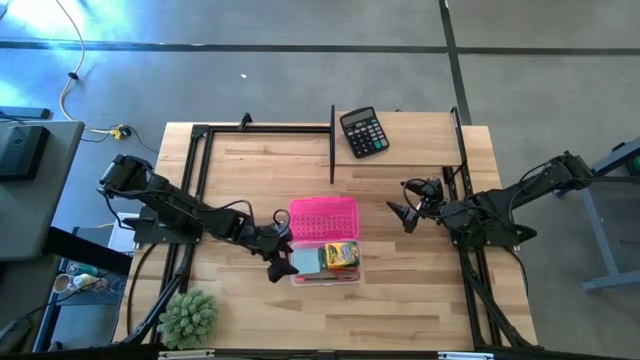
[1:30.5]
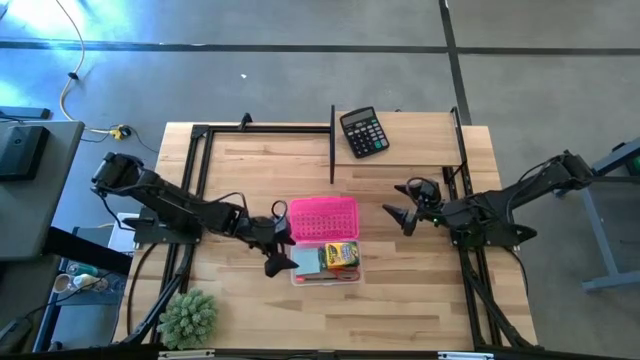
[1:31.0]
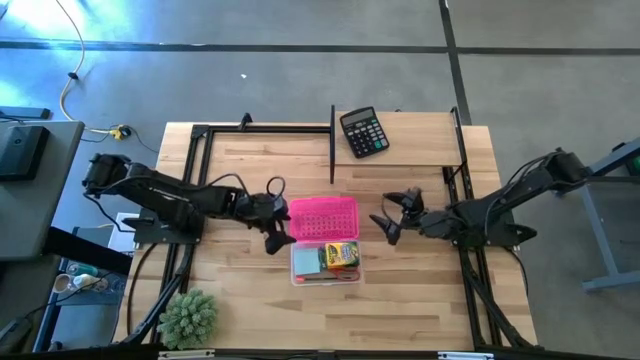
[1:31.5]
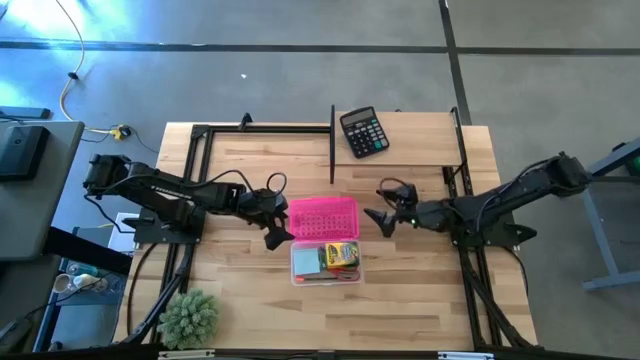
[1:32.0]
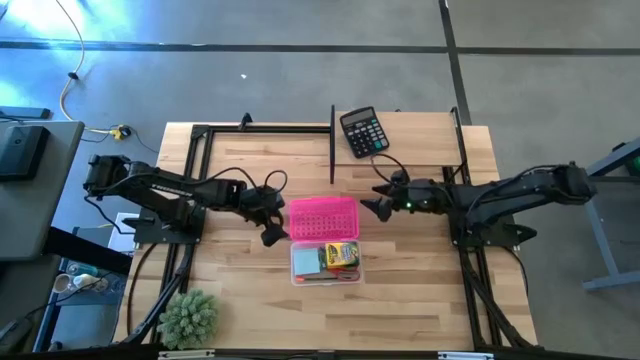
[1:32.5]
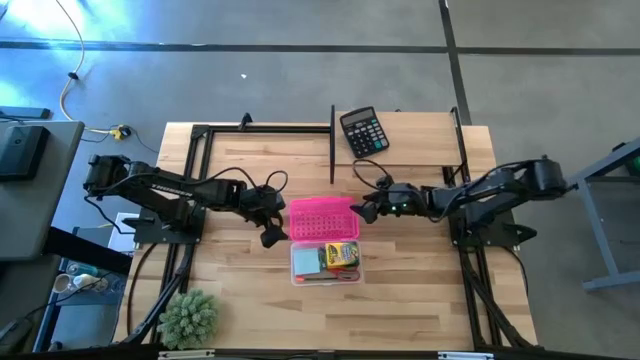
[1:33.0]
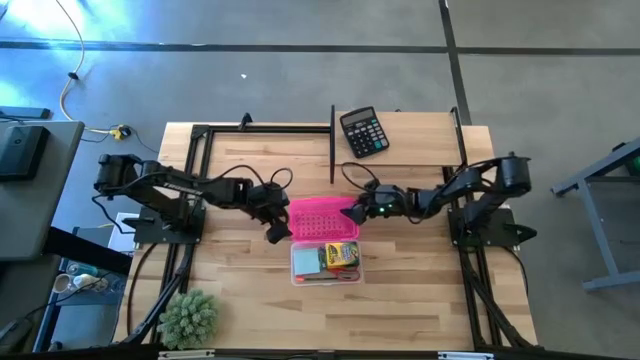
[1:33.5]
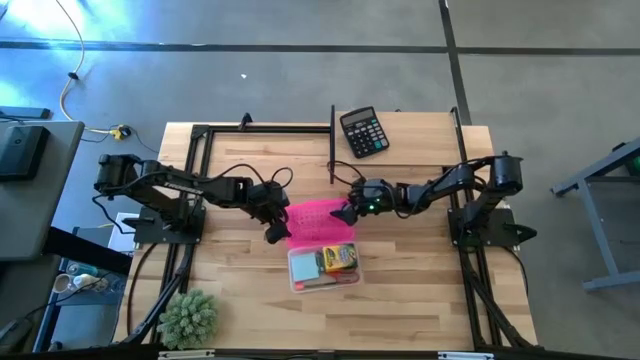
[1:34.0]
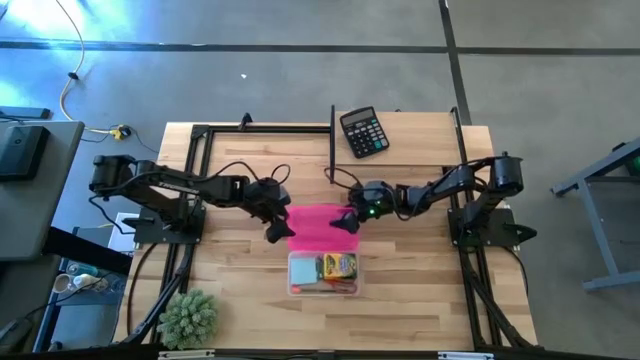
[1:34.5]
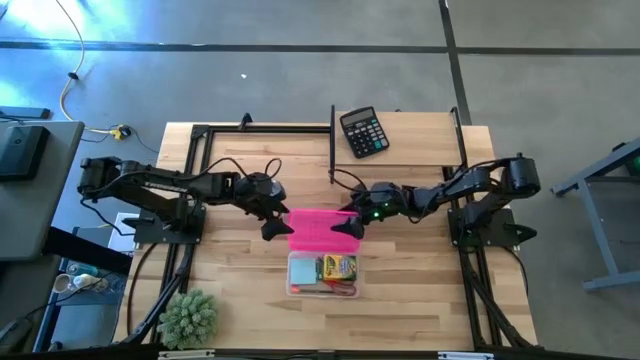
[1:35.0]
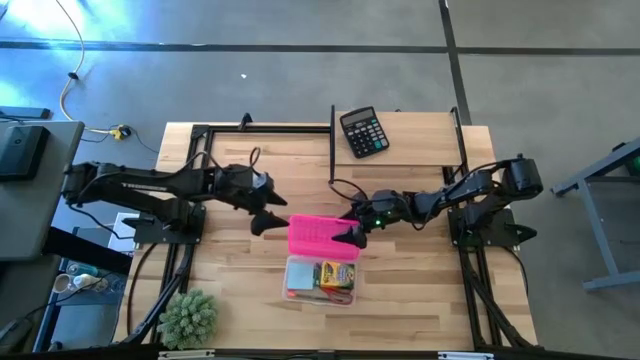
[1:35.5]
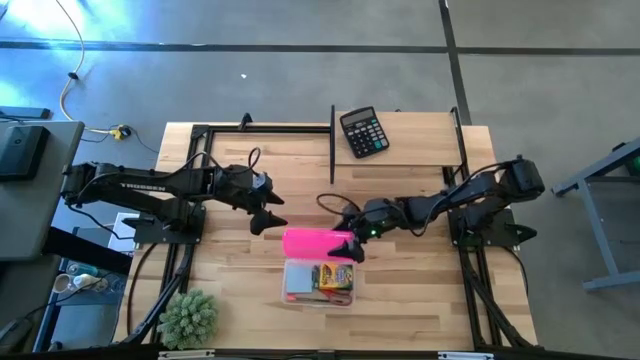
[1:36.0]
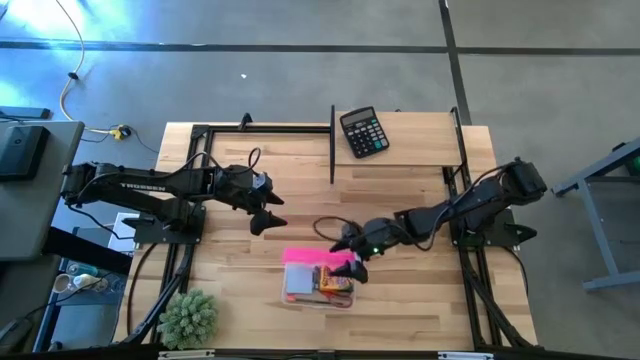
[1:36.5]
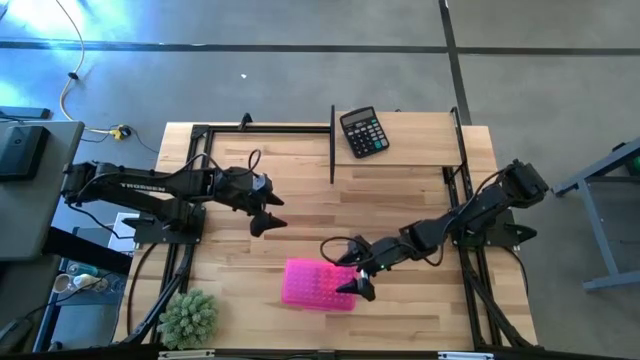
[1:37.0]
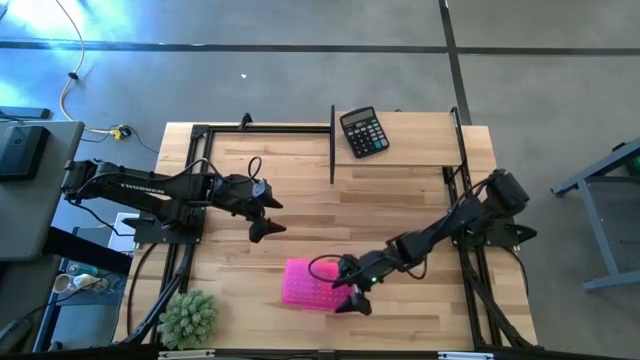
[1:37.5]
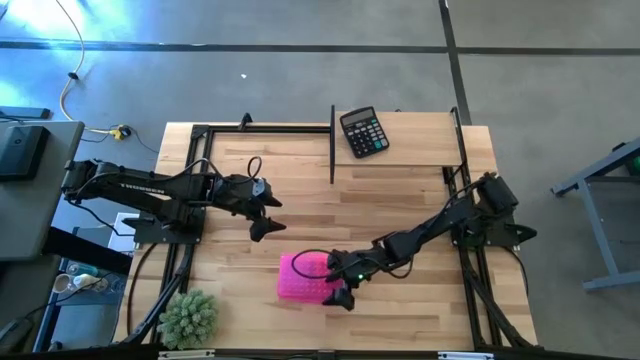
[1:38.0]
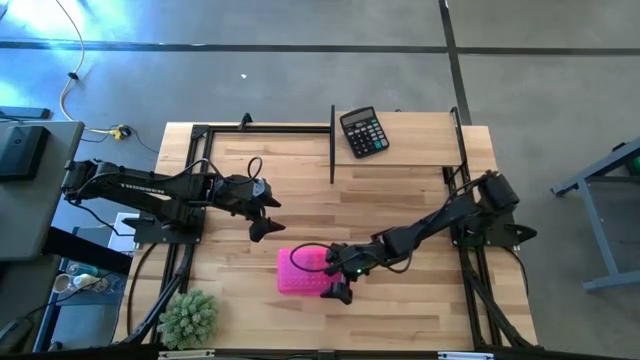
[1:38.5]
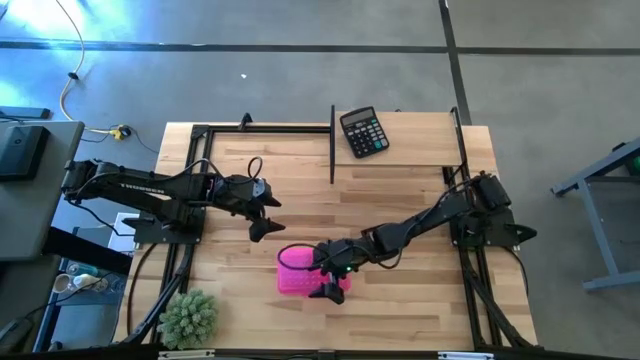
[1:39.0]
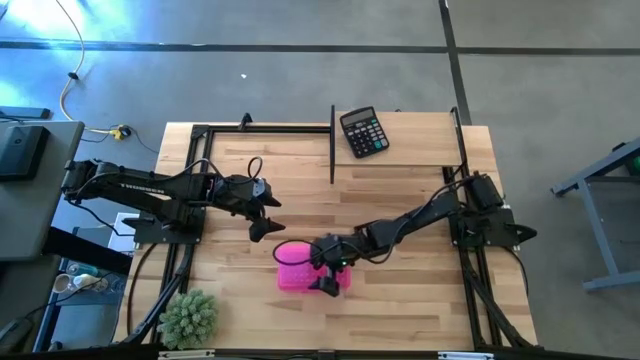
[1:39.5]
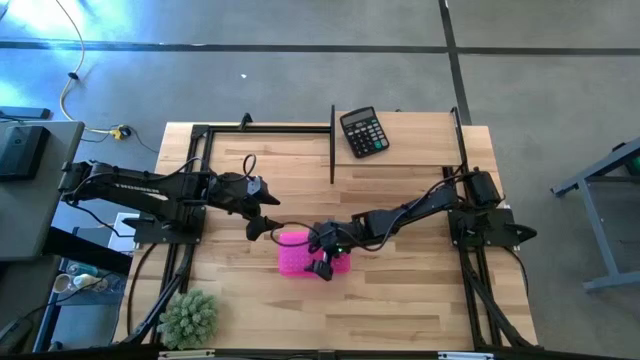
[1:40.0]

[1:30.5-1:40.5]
Task: Pack school essentials
Close the supply box

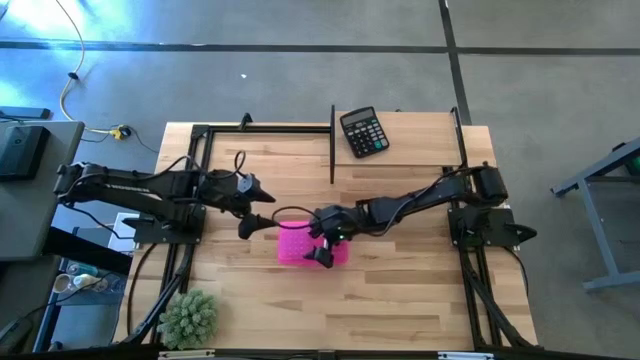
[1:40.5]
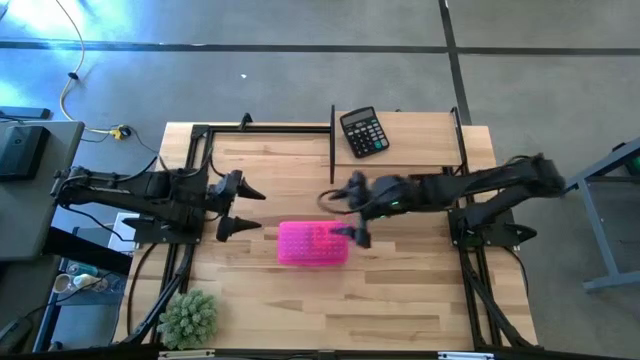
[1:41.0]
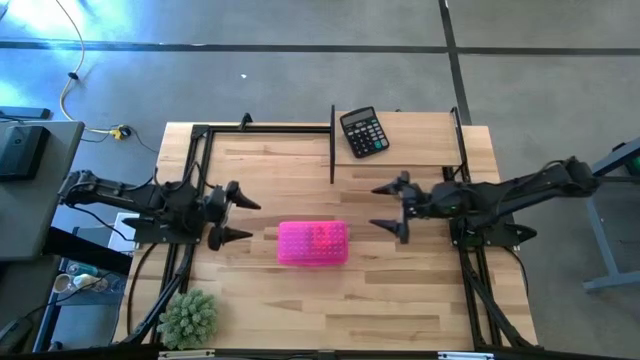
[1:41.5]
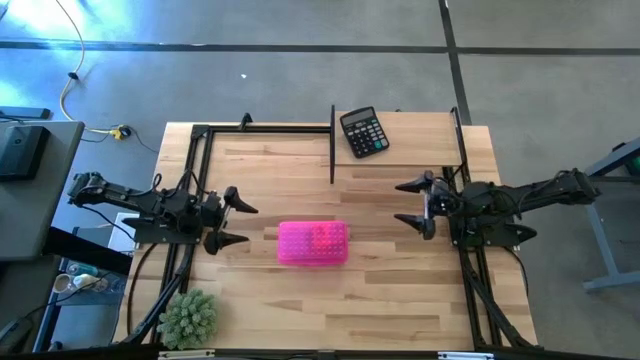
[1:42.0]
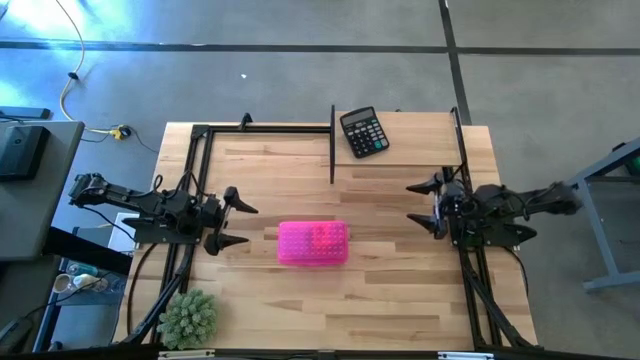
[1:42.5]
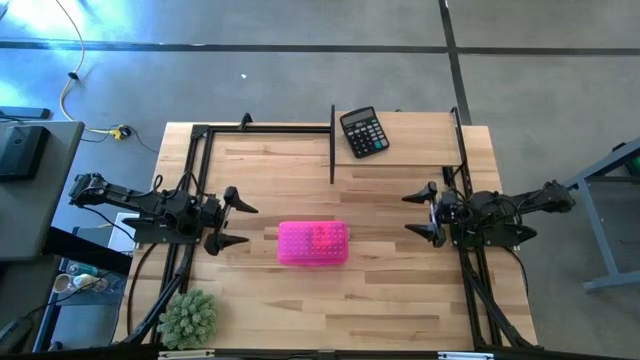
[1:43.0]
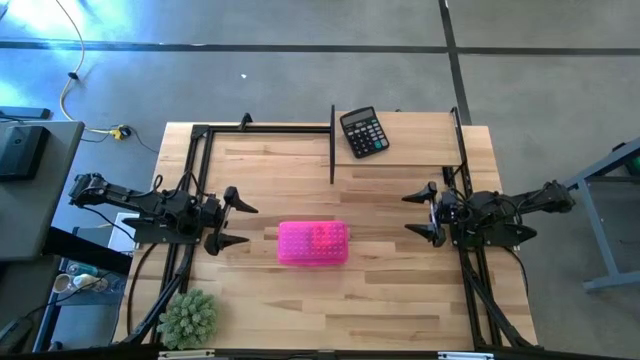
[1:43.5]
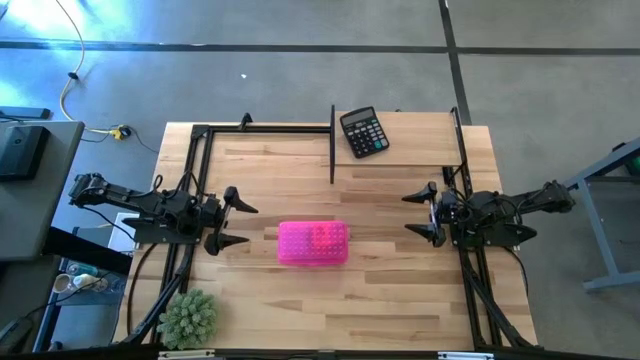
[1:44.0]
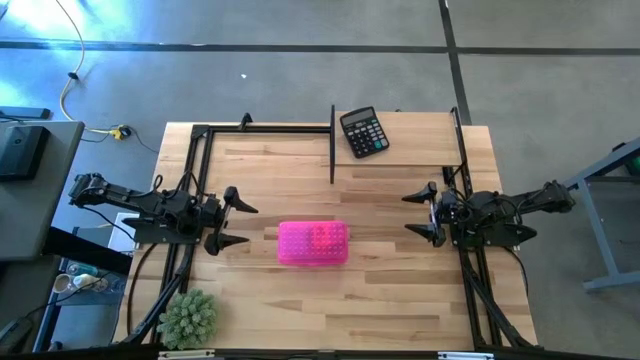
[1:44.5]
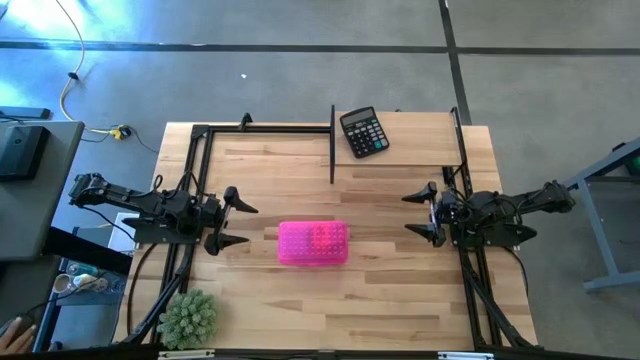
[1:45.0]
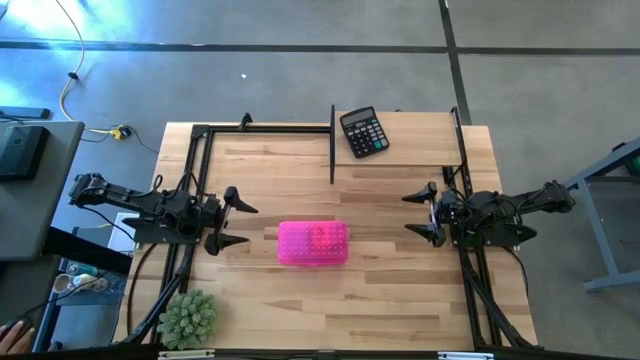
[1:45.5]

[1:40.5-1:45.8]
Return to Home Position
